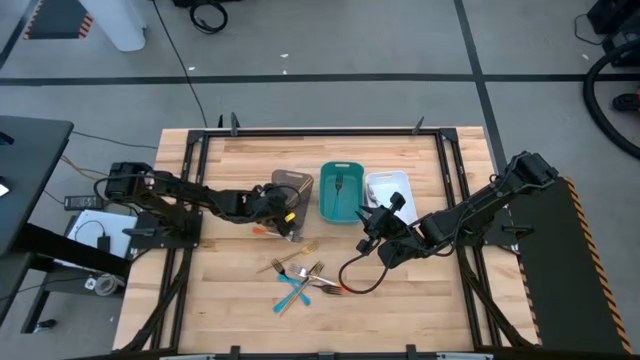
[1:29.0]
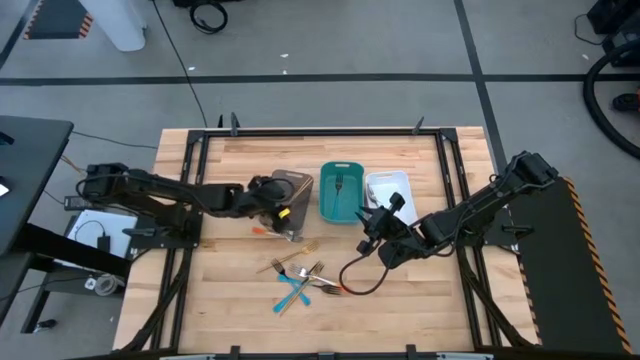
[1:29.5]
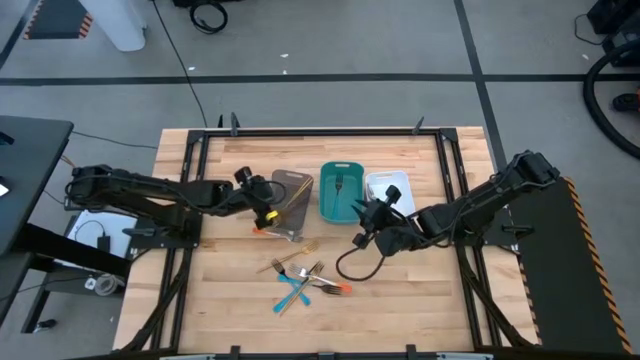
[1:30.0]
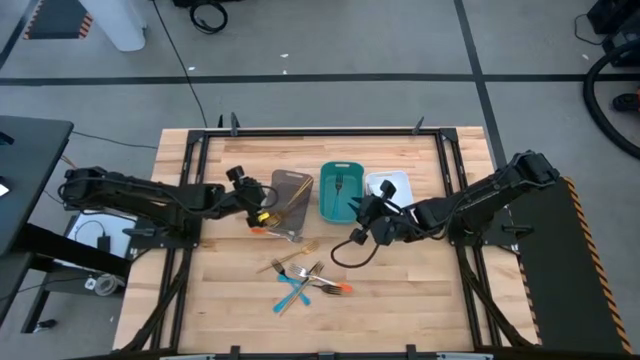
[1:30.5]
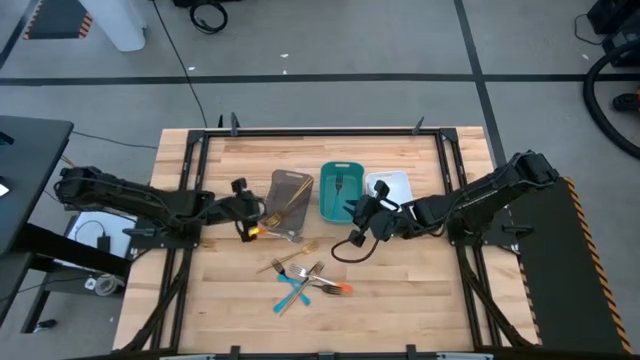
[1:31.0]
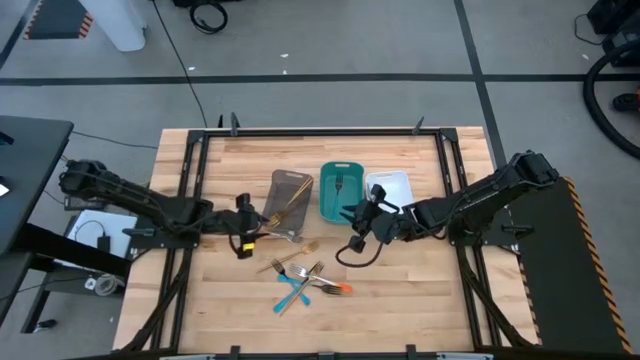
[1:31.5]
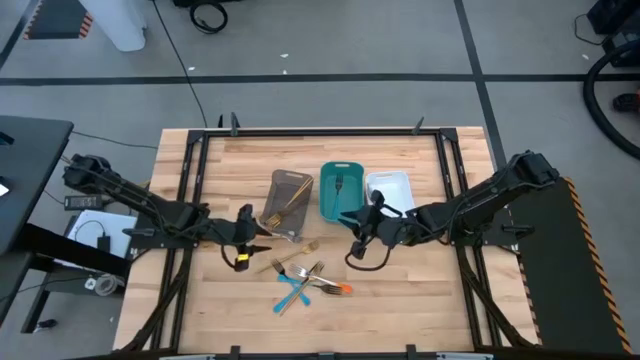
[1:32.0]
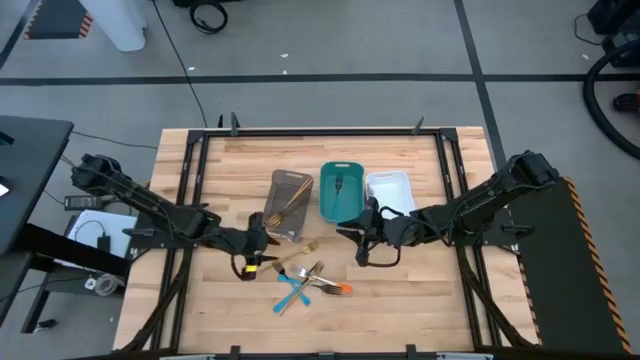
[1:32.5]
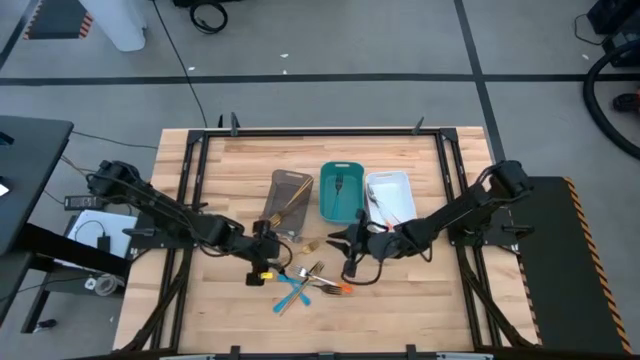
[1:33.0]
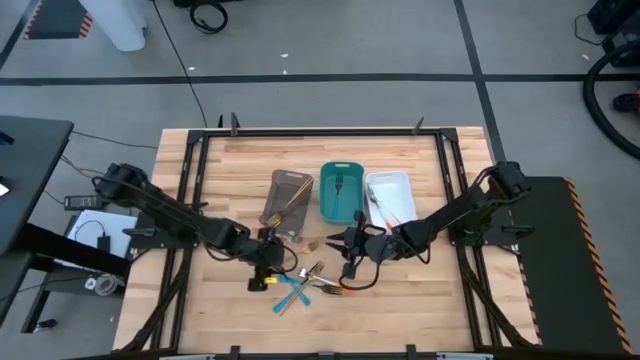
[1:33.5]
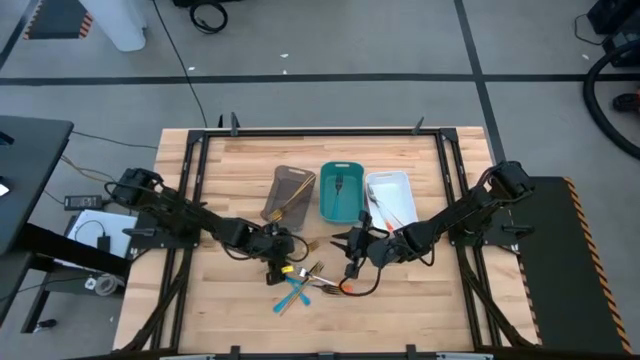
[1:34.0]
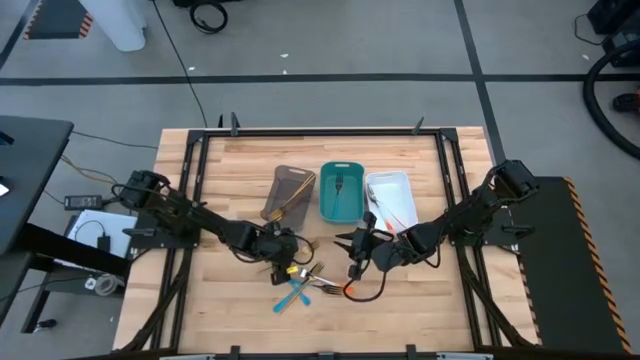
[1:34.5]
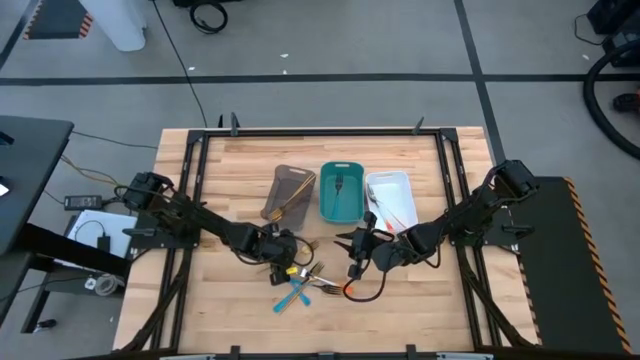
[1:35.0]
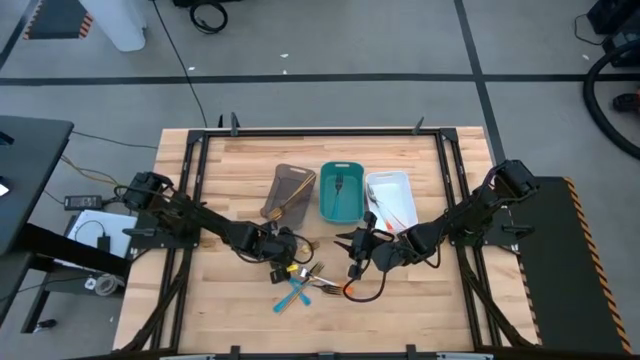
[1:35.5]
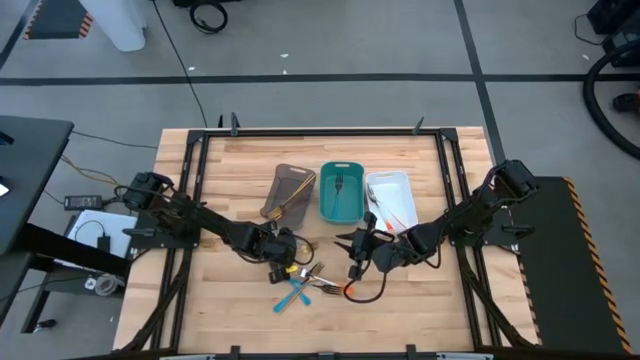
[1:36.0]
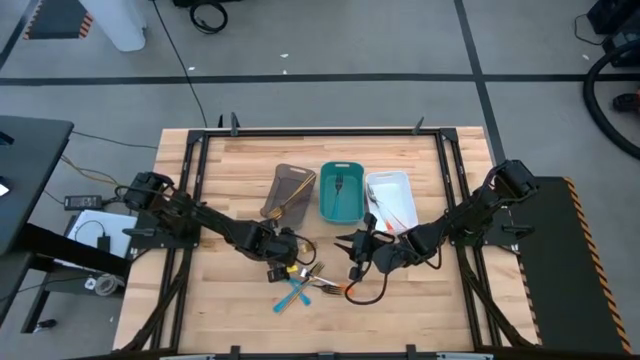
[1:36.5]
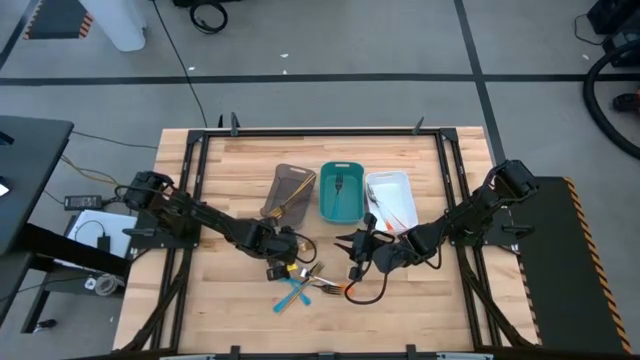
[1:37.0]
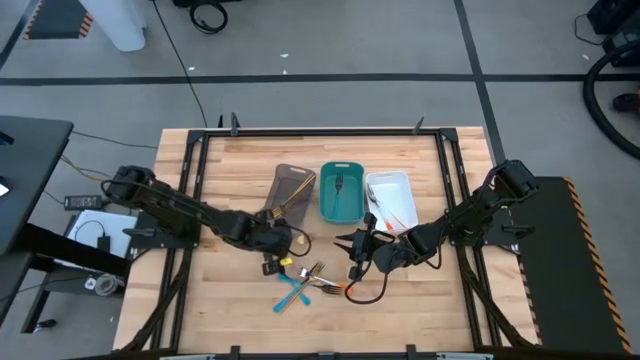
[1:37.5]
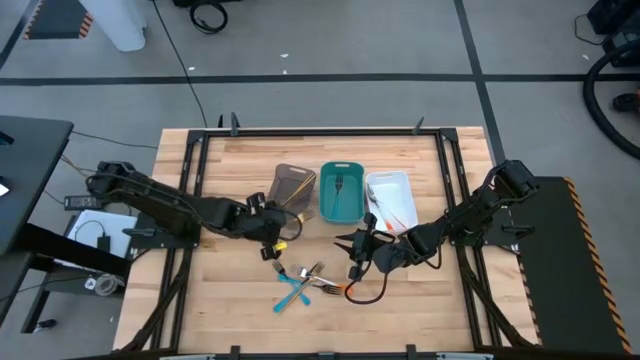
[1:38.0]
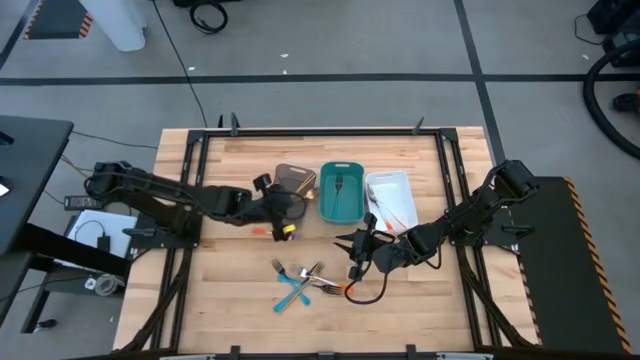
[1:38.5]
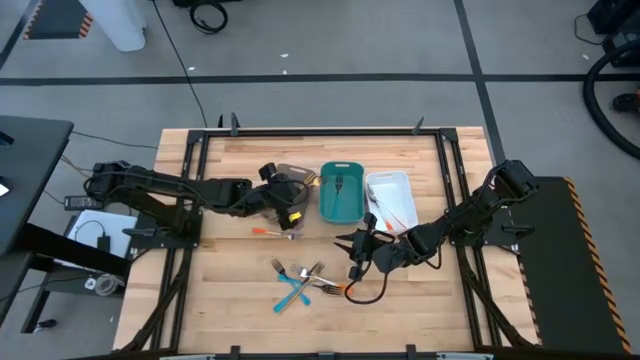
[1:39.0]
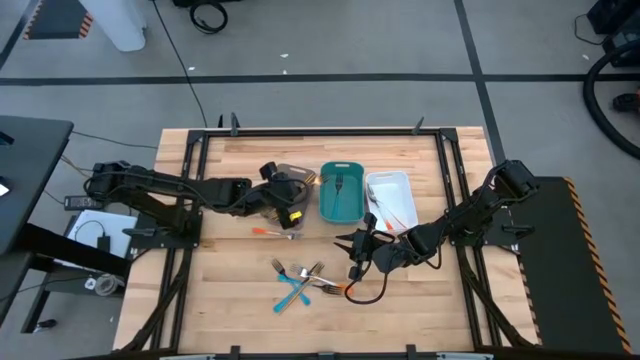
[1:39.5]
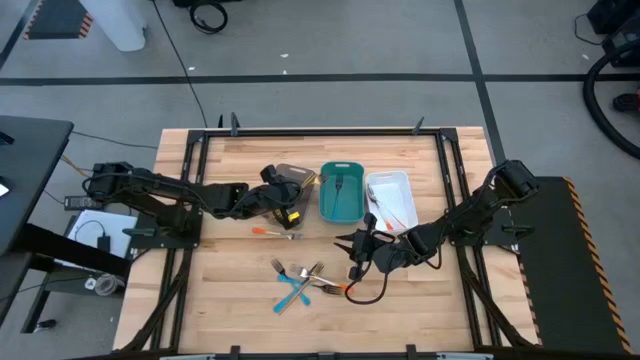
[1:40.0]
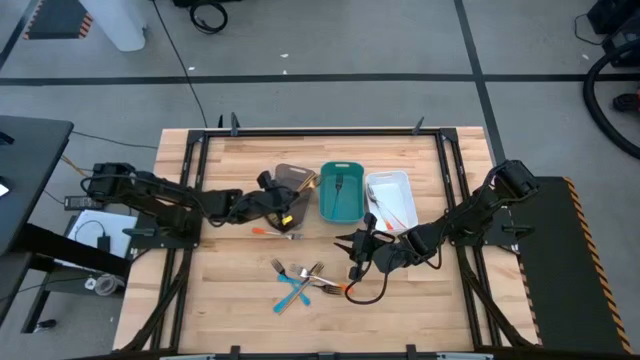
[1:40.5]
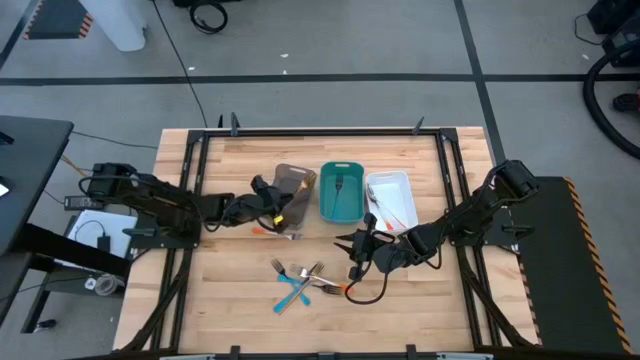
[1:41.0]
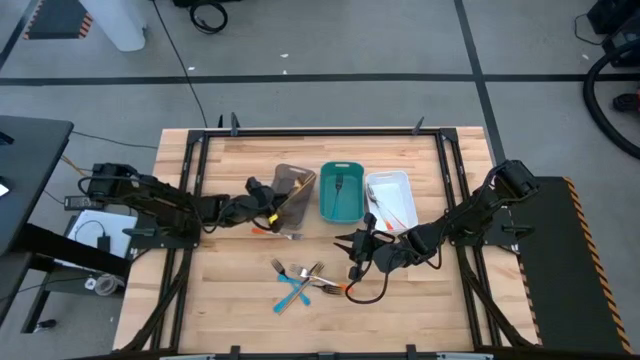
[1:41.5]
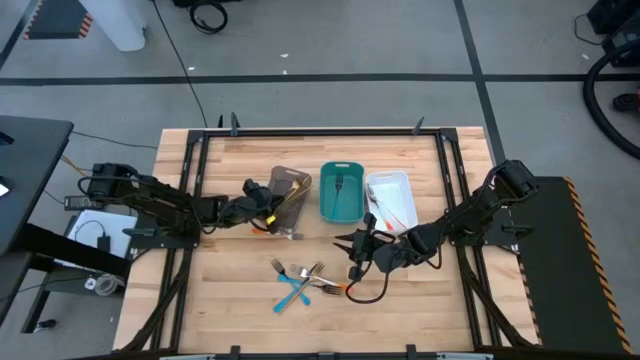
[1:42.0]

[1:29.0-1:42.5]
Task: Sort silverware by color (type)
Put the gold fork into the black bin

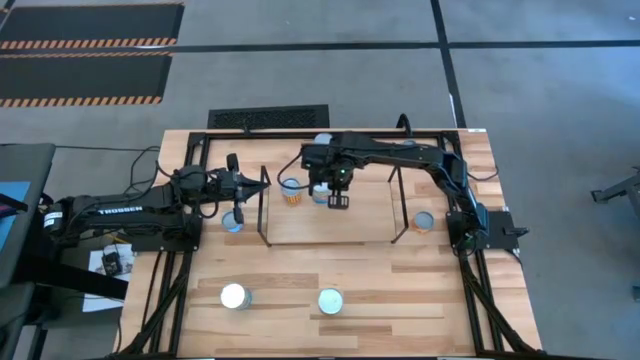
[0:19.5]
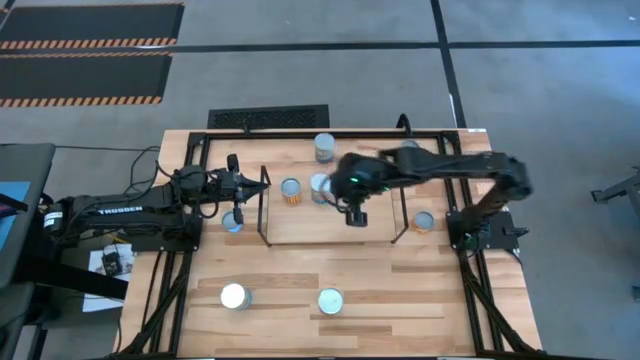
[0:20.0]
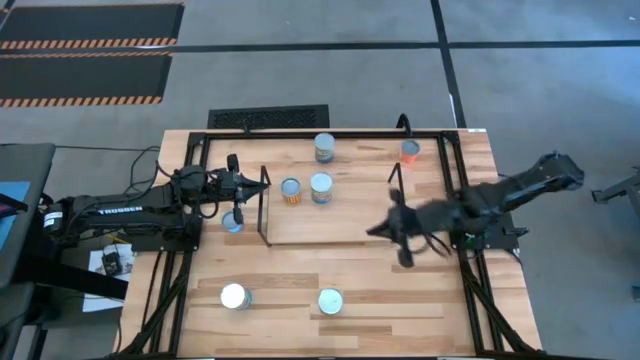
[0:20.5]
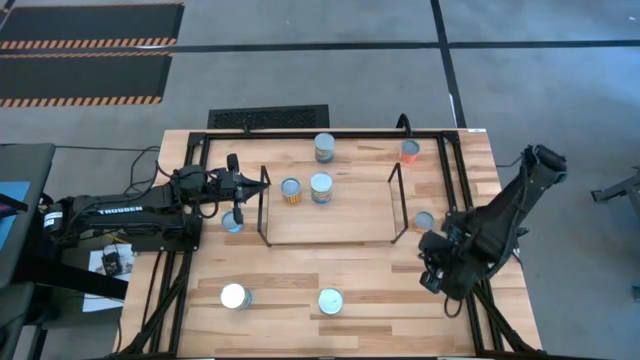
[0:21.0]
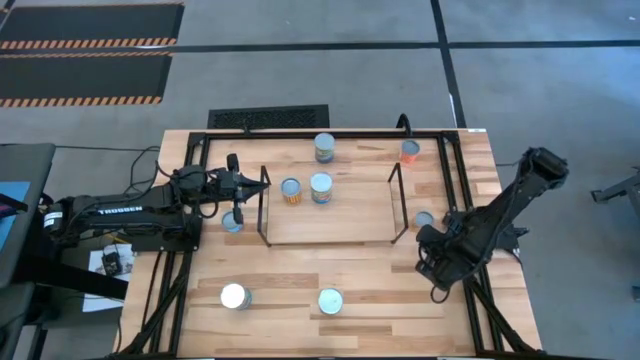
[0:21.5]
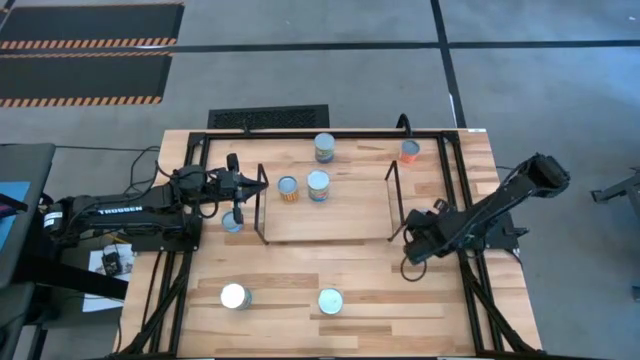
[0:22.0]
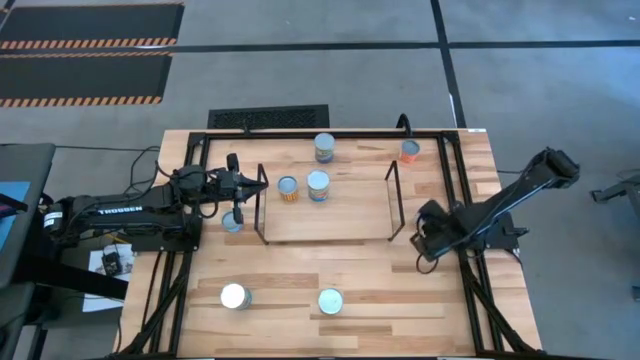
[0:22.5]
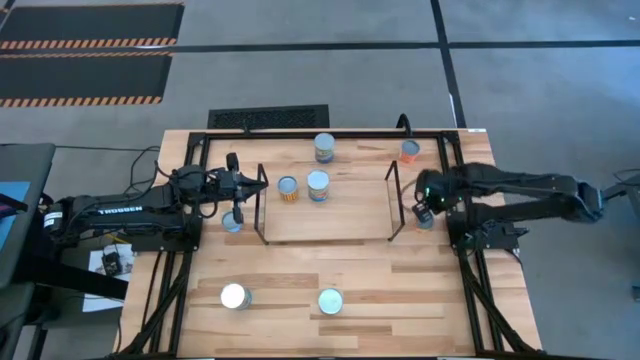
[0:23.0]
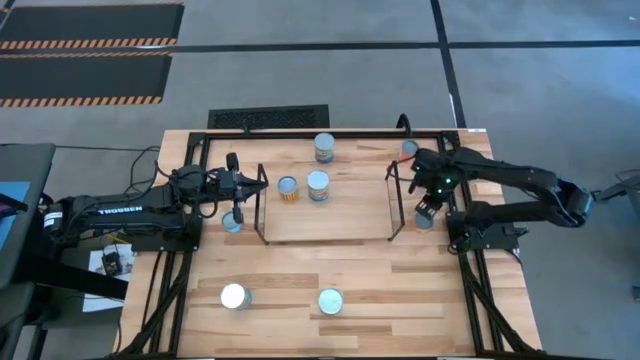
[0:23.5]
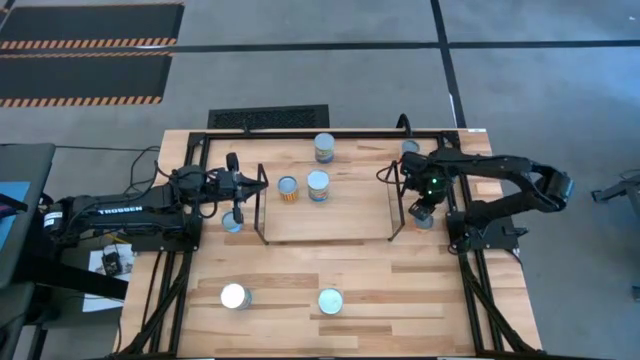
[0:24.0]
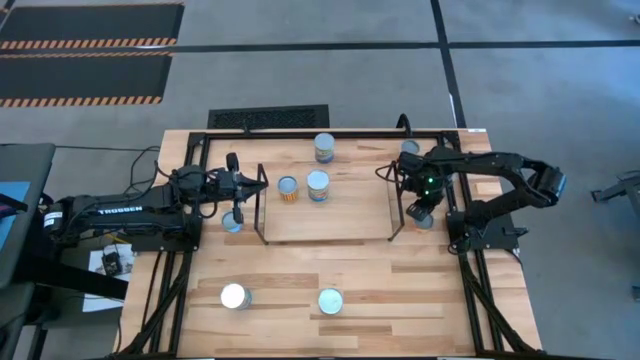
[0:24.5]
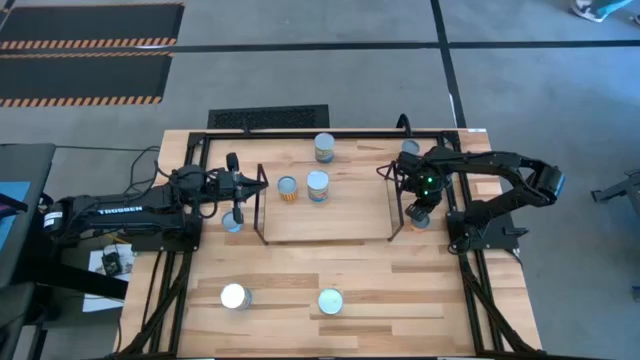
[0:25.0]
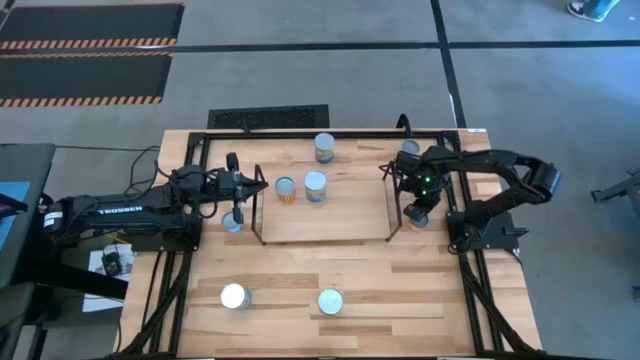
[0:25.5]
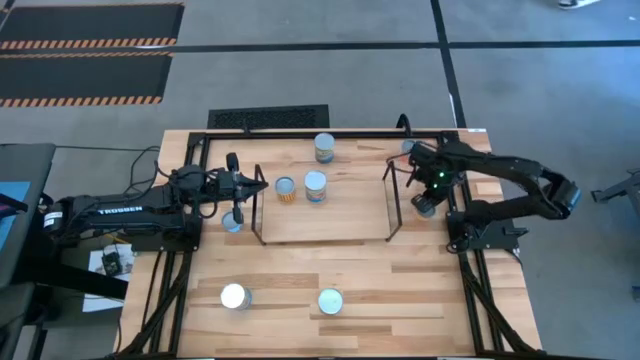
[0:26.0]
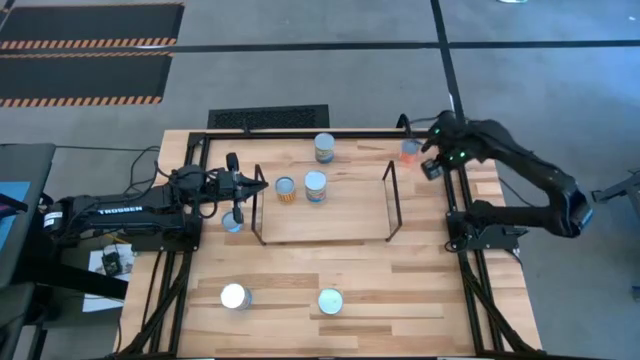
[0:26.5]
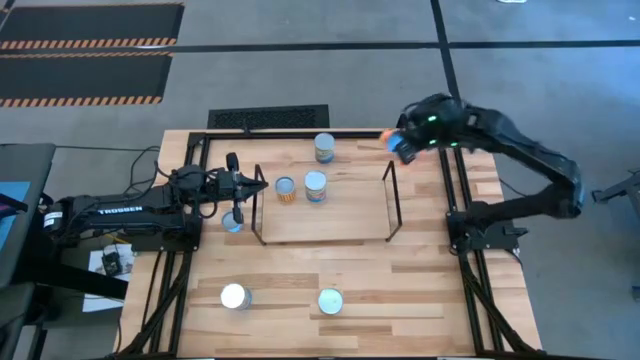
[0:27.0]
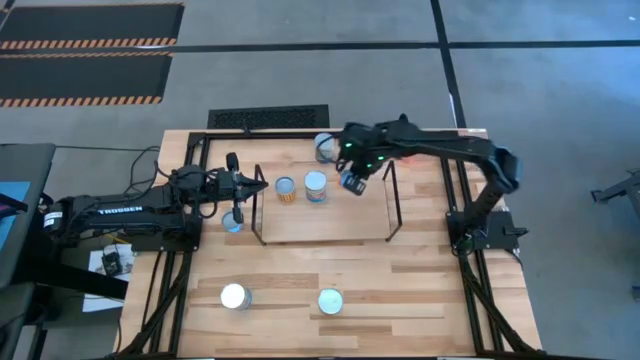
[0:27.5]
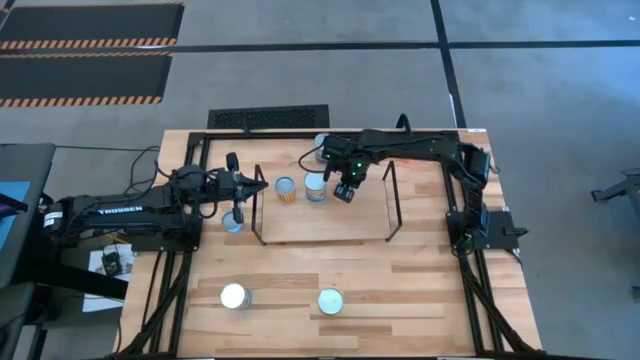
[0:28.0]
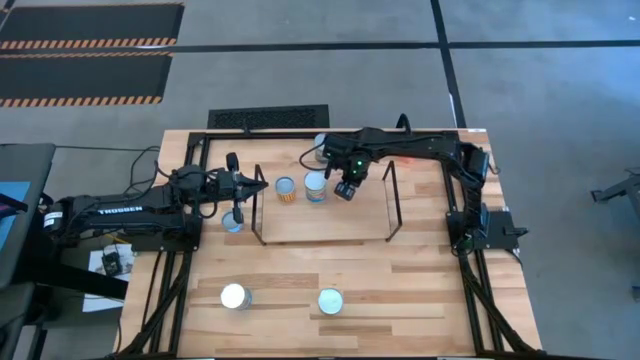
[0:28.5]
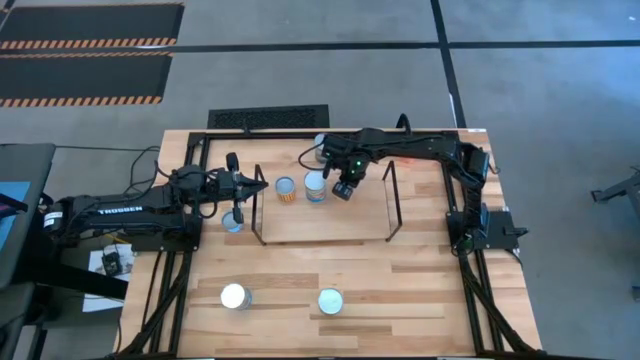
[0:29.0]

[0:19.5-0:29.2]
Task: Pick and place cans onto a shelf
Put the pineapple rings can on the shelf
